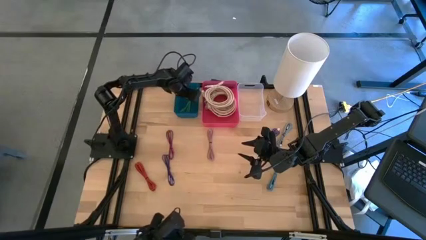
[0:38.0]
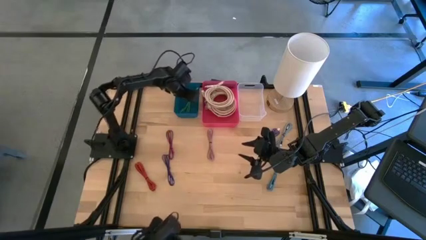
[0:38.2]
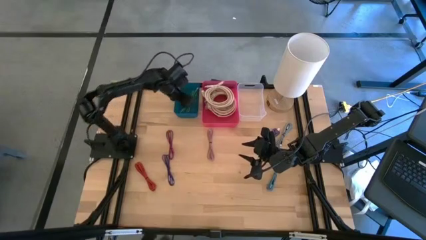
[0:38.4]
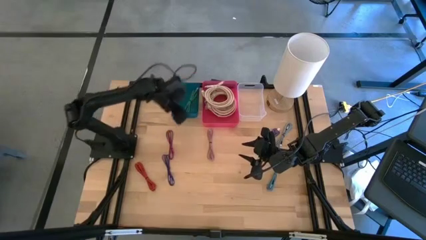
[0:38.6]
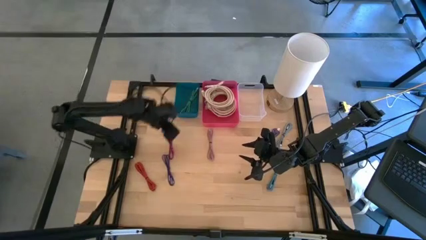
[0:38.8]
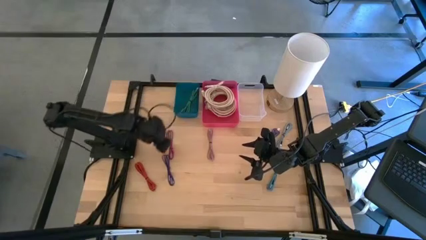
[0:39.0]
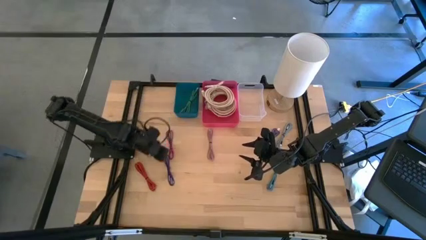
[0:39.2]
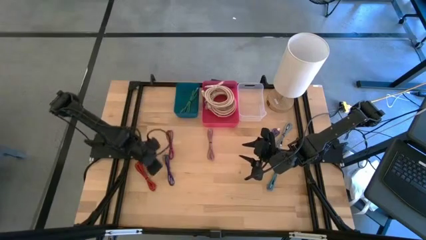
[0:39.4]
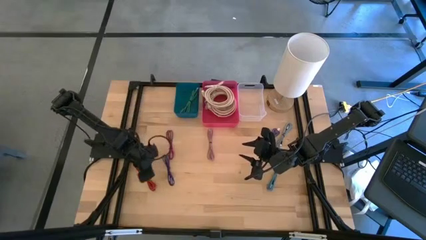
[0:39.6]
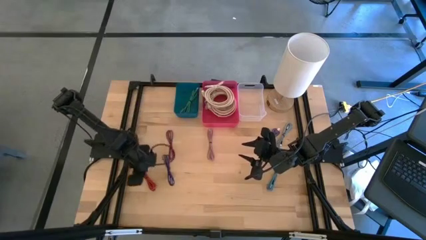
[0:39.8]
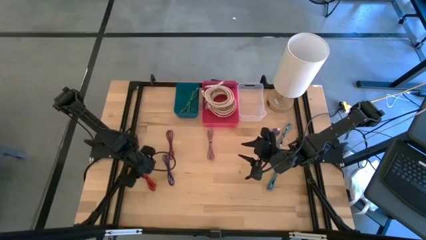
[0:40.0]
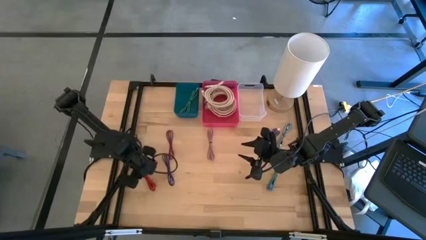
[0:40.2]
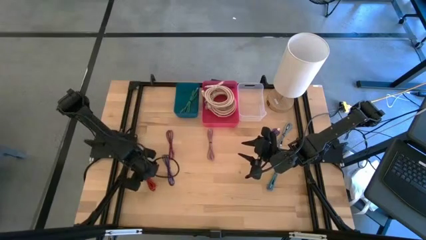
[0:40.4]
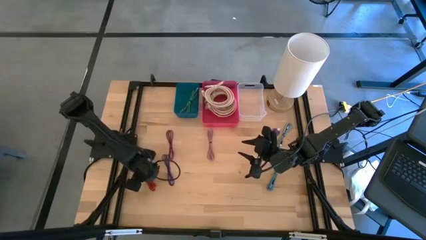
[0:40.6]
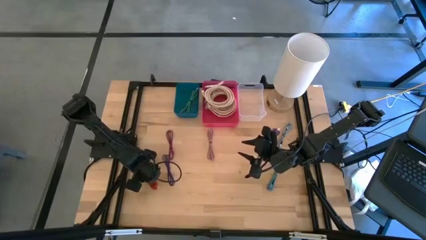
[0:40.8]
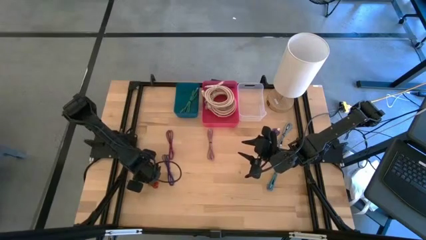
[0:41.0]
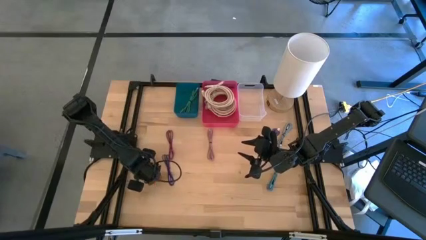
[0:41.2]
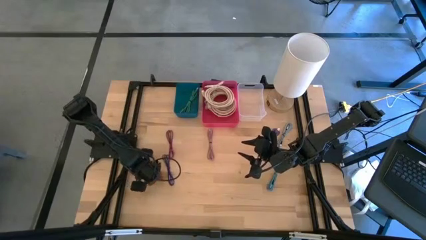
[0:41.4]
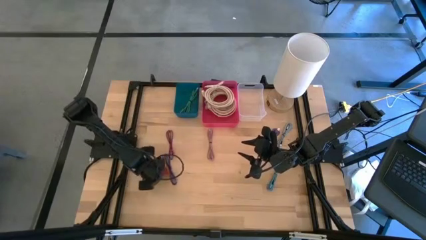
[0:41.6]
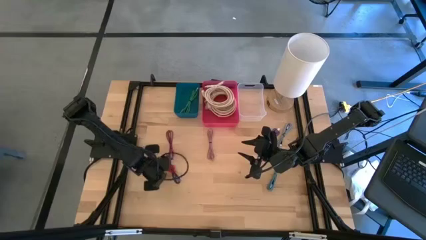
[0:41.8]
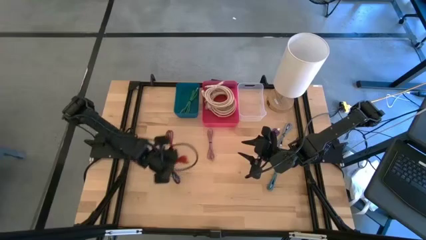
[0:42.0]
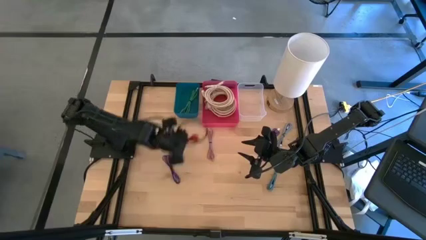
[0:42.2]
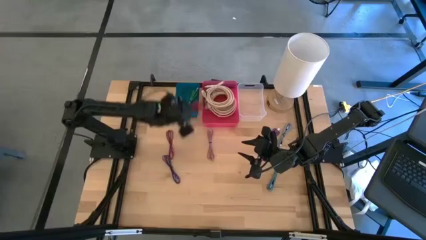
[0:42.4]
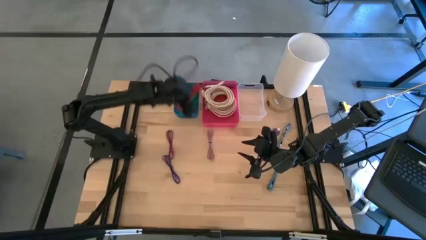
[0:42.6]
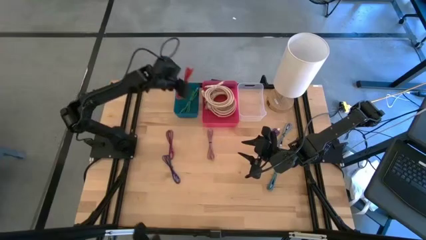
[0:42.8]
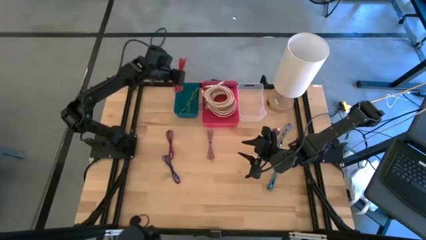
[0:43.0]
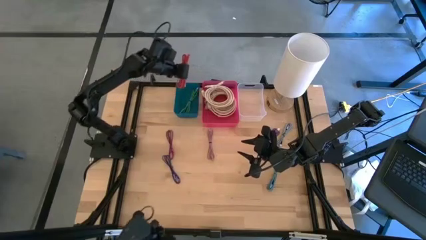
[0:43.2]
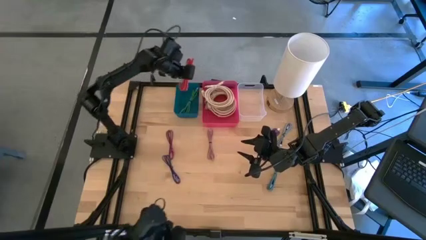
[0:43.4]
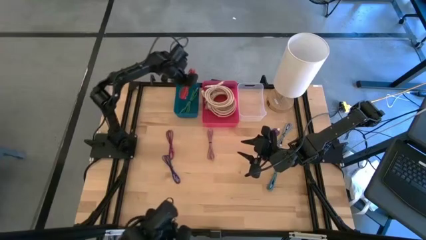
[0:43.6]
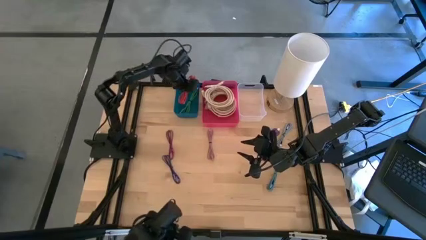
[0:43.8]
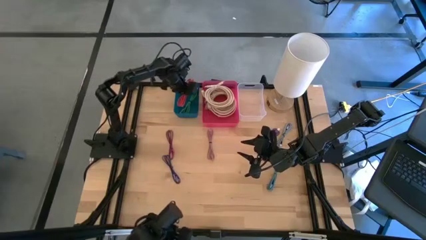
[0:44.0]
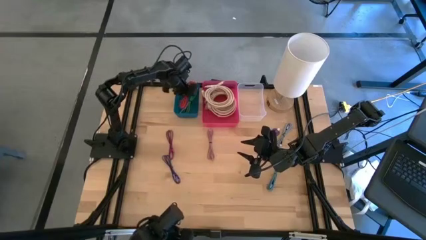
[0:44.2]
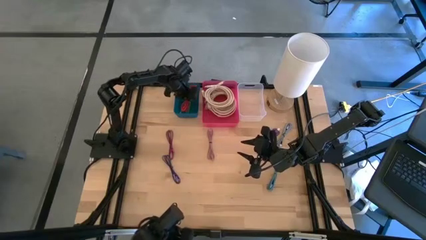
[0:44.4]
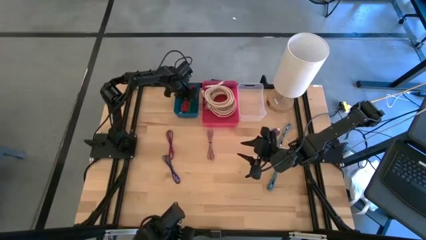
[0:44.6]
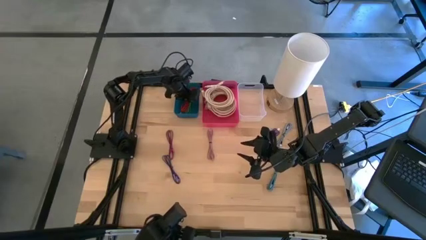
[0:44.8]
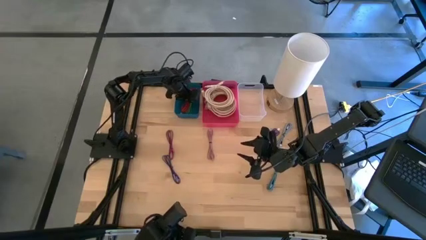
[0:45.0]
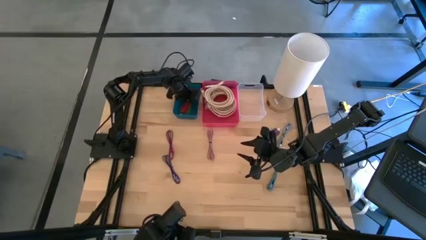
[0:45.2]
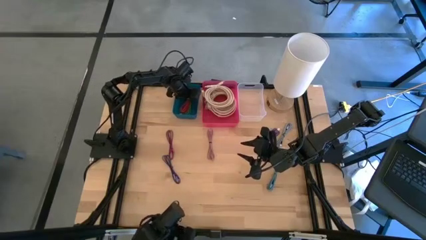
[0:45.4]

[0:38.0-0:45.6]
Task: Pick & Place USB Port
Put the orange charger cable into the blue bin

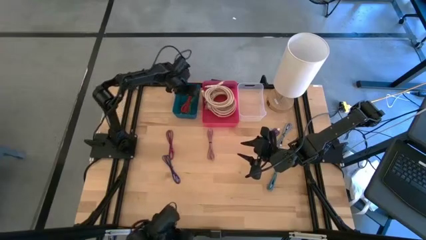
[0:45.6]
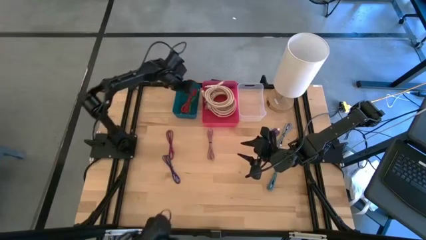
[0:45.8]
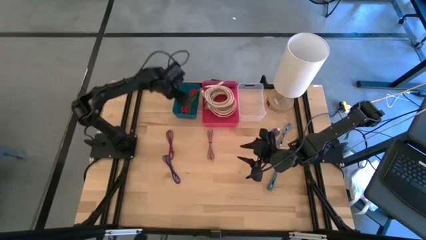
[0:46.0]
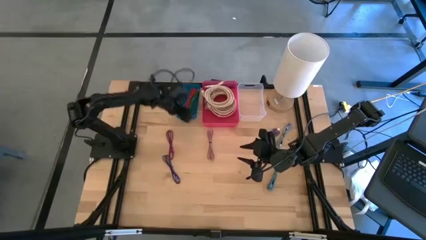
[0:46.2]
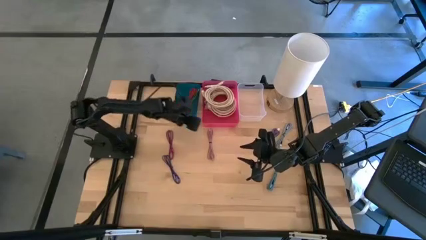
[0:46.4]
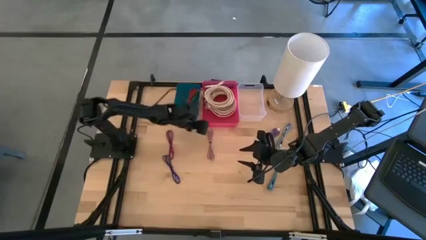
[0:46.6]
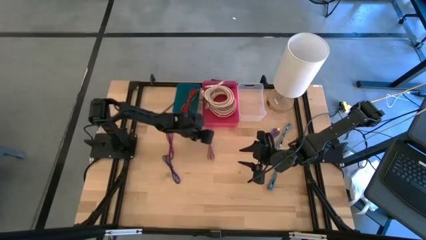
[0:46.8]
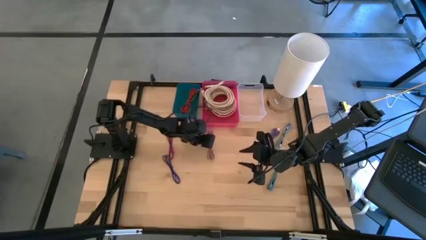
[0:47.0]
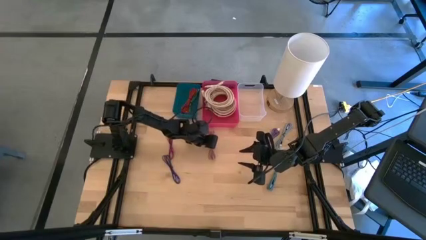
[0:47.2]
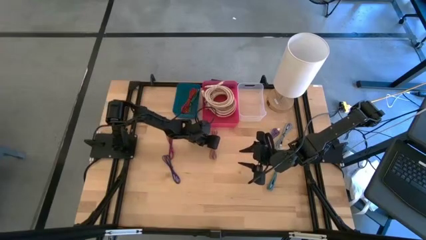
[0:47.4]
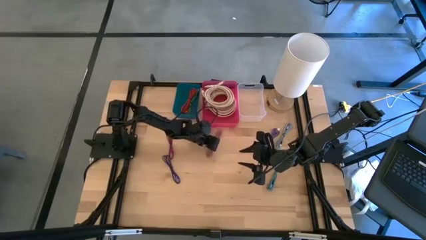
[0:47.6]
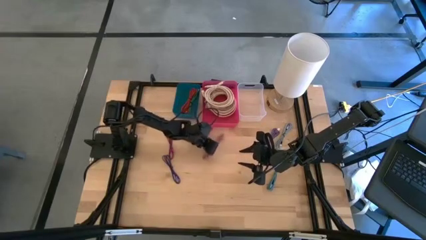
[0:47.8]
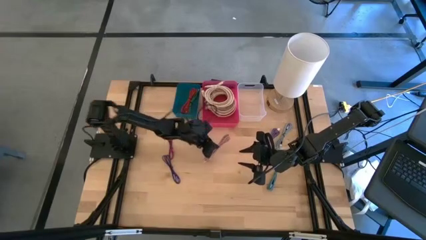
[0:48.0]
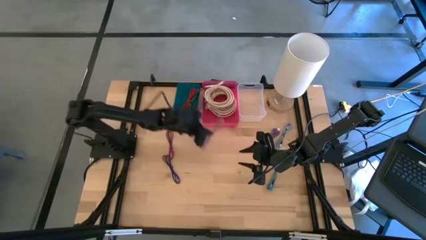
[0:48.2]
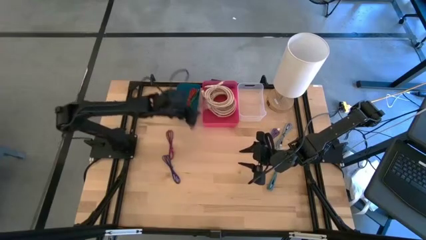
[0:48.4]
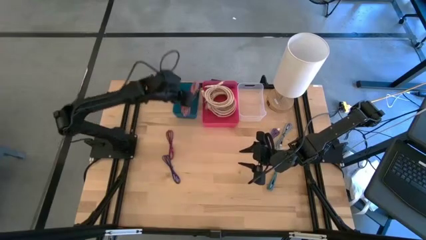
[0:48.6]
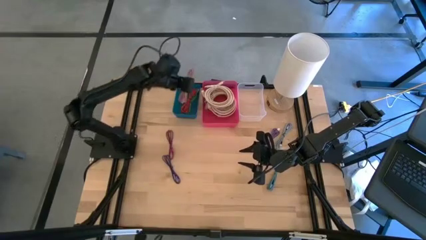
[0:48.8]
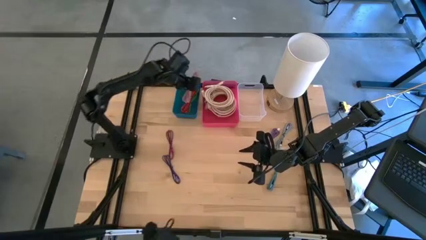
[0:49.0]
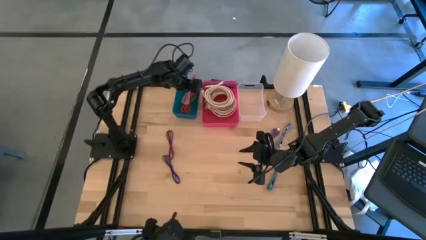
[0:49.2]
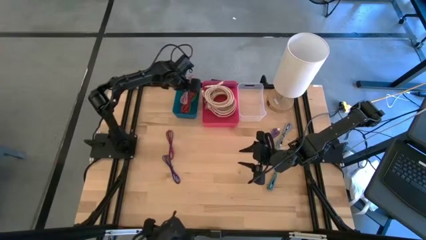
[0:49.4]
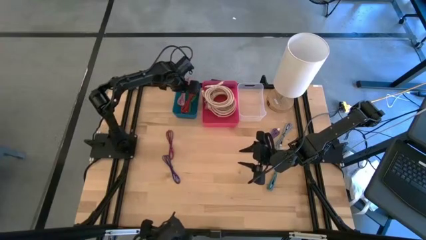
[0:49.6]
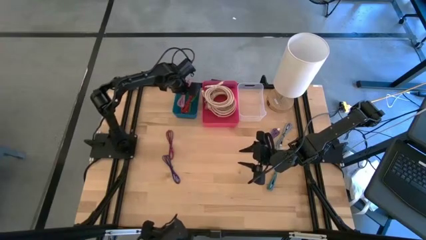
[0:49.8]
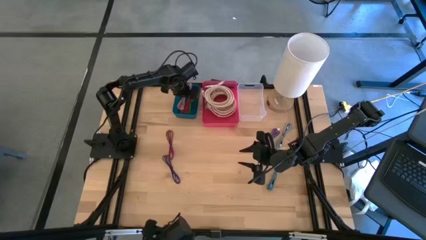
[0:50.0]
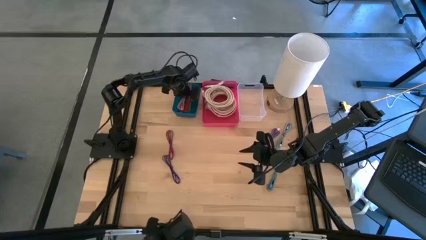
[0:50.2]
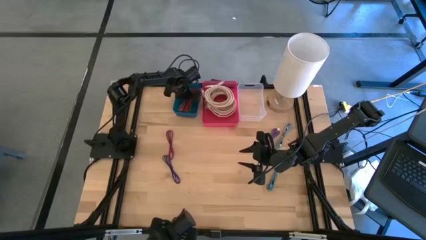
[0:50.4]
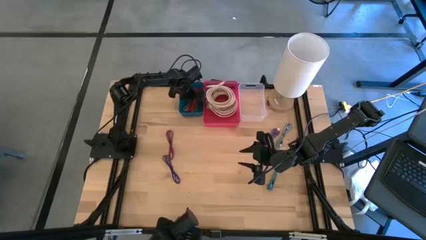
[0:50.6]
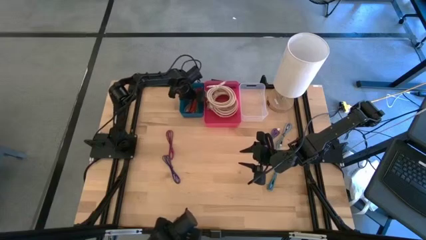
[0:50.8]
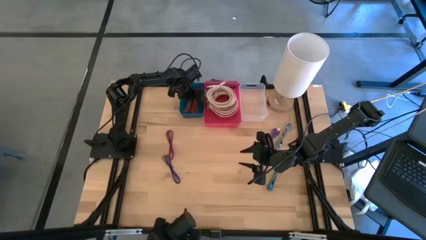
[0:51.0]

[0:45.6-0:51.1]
Put the pink charger cable into the blue bin

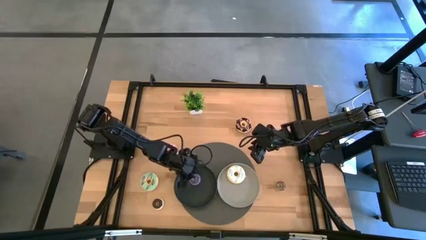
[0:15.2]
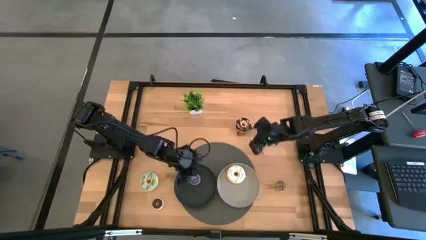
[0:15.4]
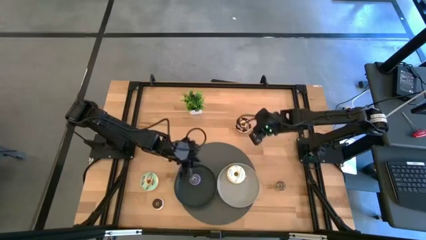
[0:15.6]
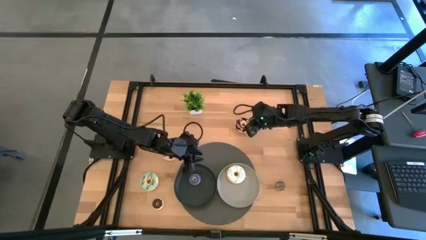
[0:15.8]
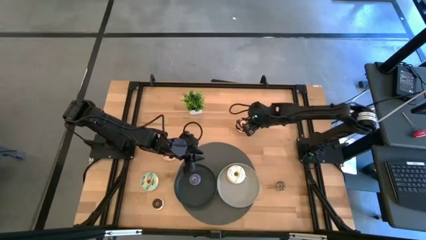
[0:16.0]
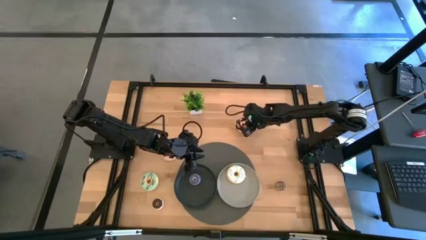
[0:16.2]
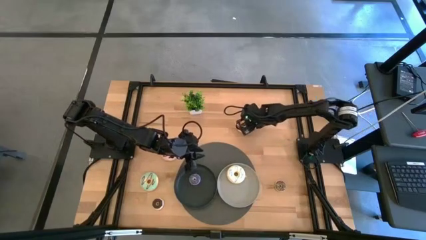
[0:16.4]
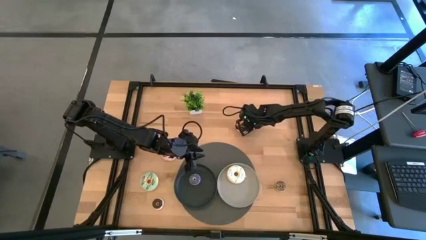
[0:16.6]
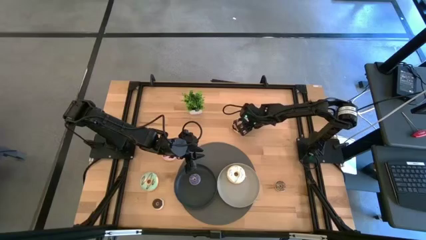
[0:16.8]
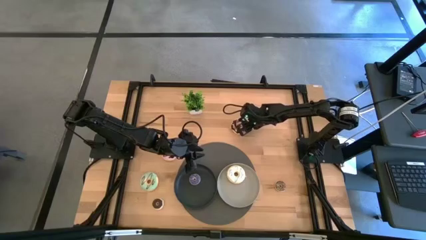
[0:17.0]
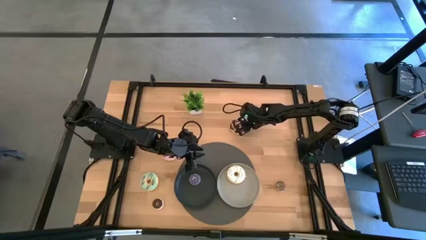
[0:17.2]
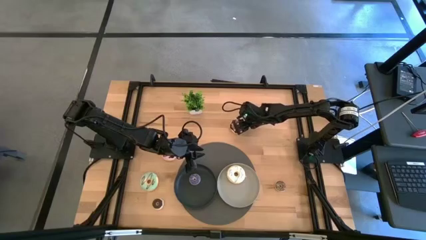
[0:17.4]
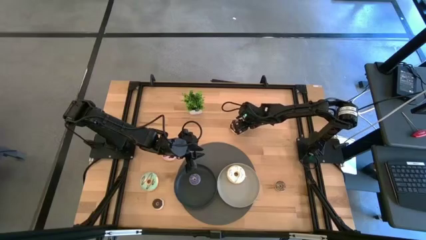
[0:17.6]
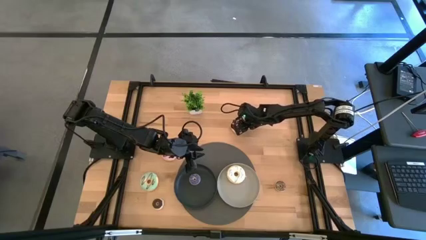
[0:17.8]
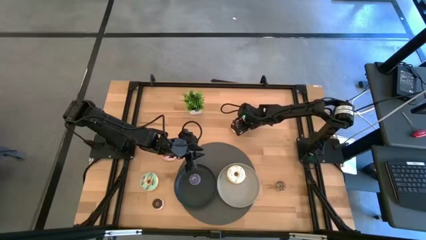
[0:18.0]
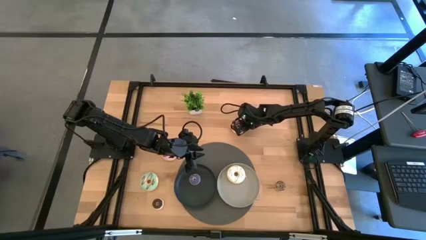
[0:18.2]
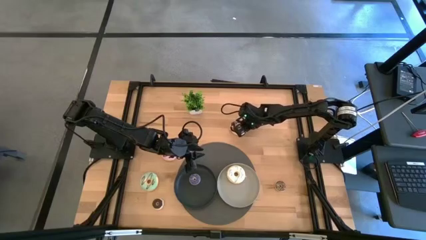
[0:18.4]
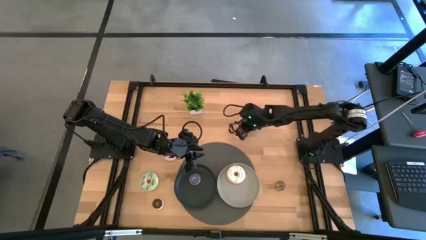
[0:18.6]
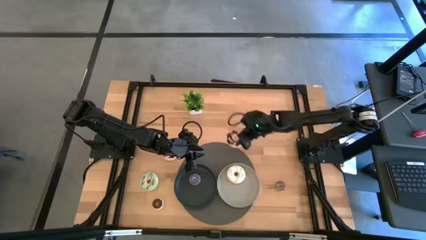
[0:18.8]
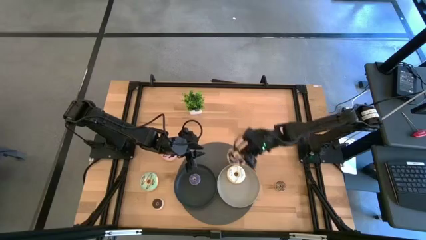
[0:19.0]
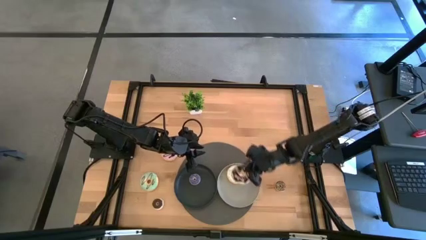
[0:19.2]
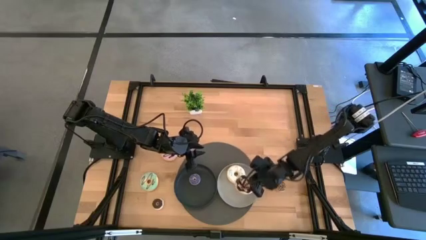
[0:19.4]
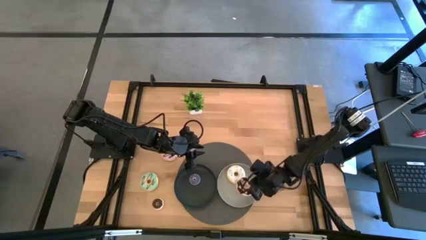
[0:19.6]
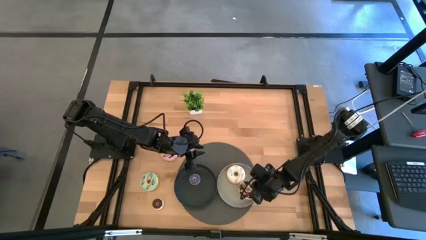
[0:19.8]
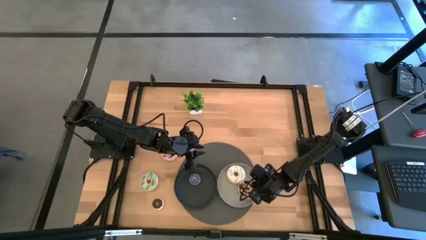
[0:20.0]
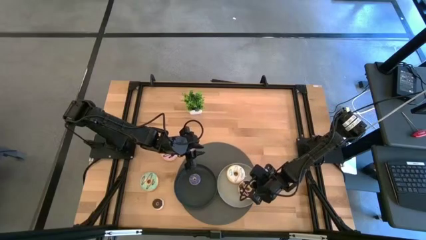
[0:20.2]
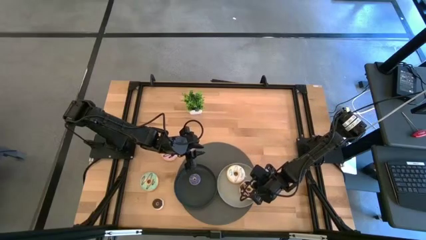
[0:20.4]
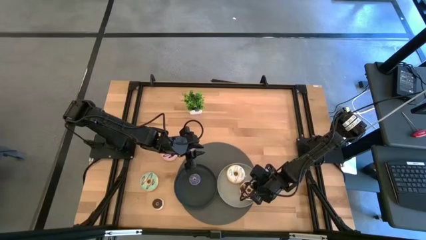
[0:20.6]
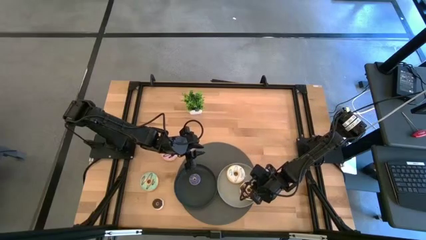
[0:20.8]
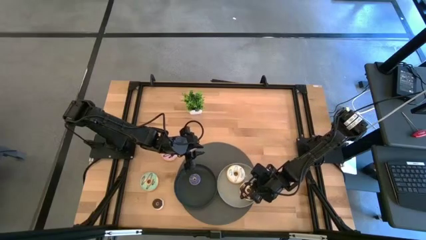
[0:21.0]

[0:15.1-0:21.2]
Task: Pick & Place donuts
Put the large black donut on the gray plate
